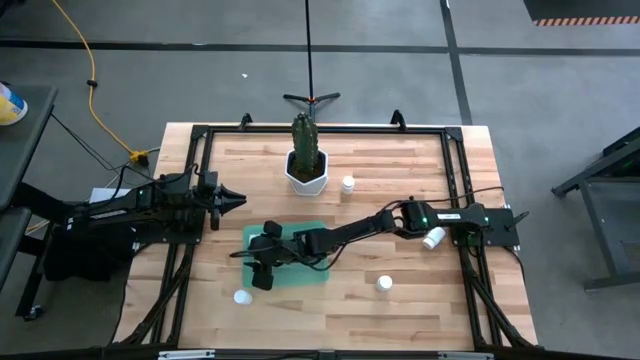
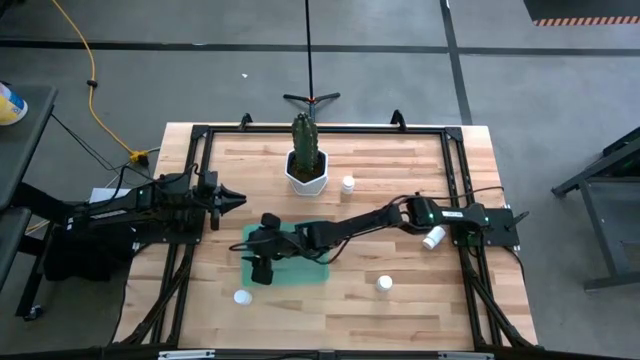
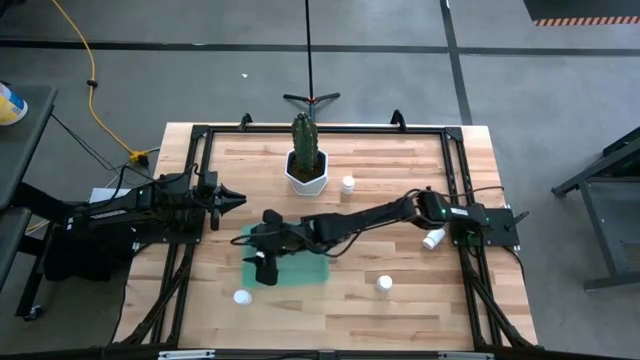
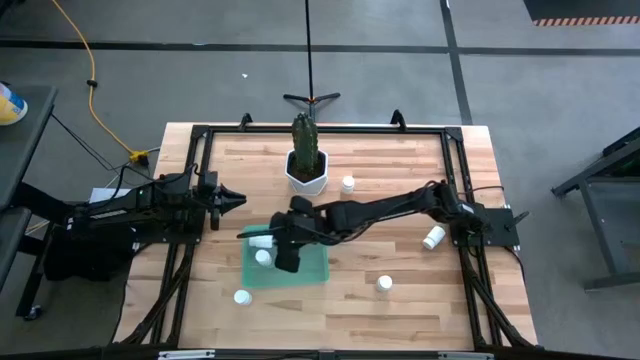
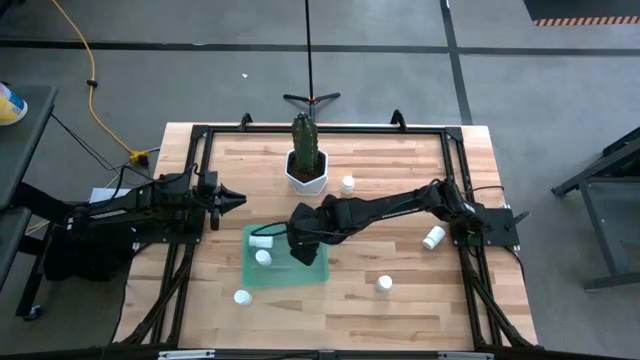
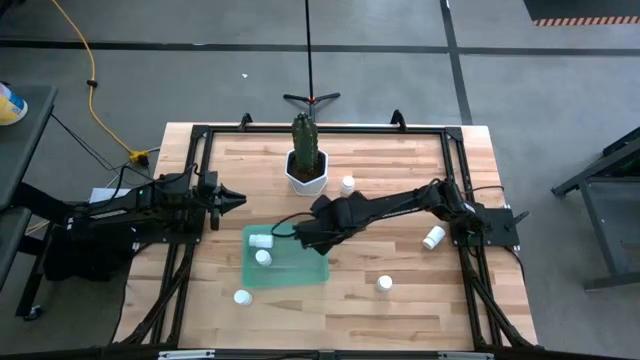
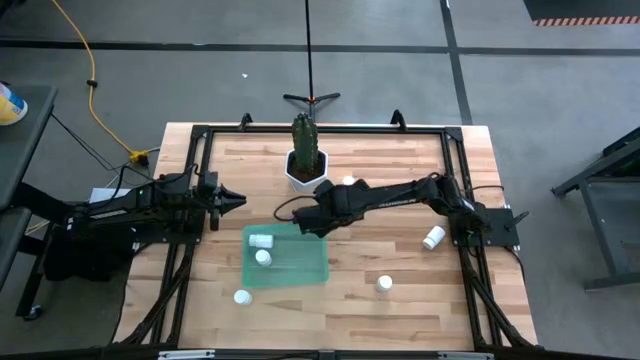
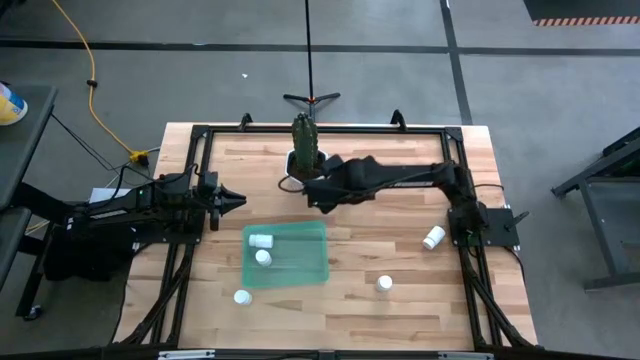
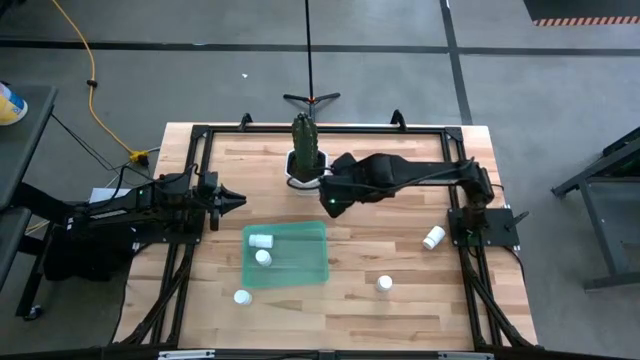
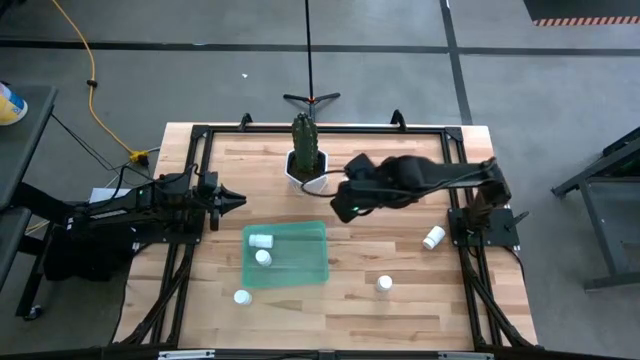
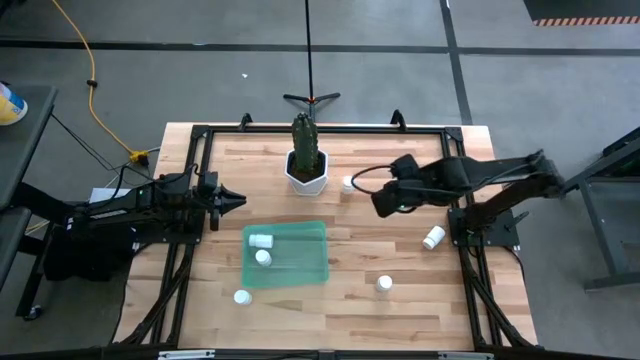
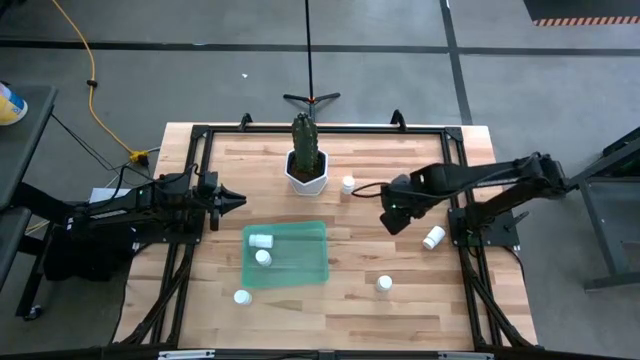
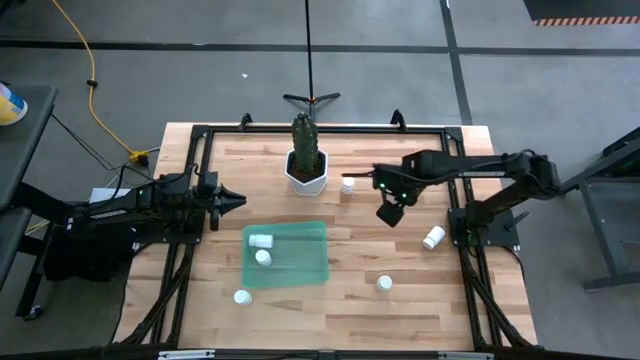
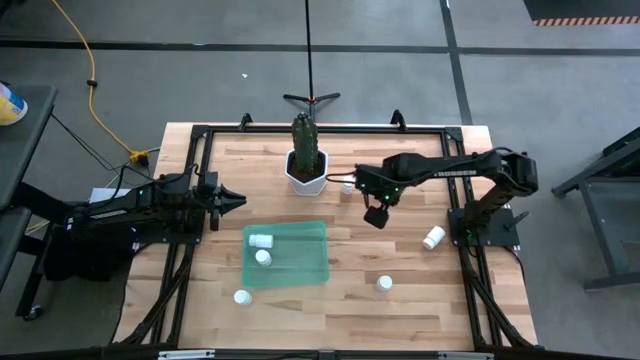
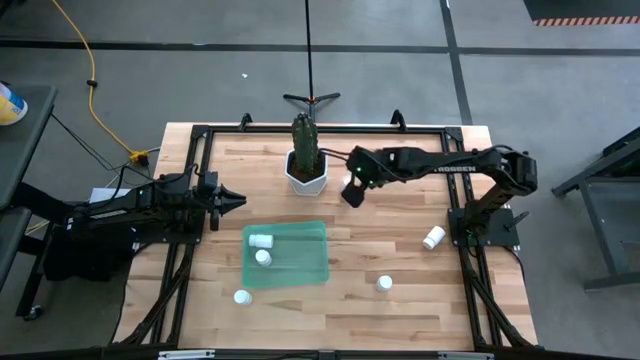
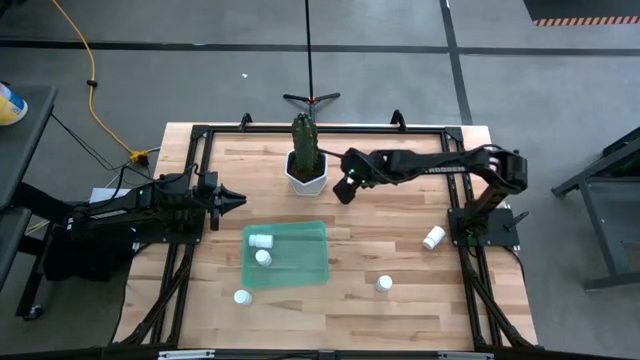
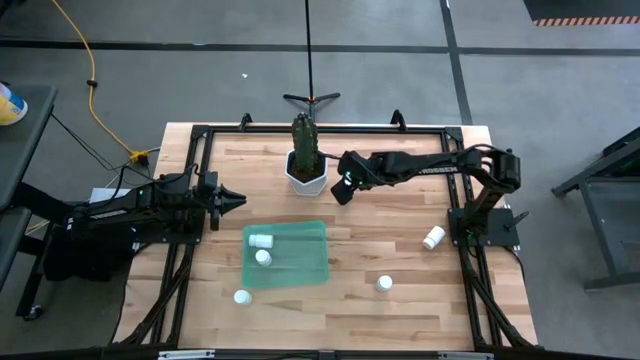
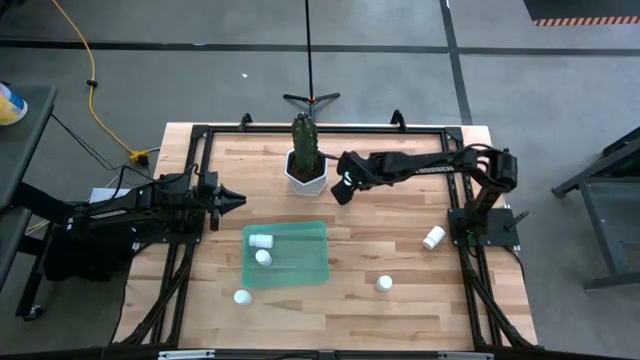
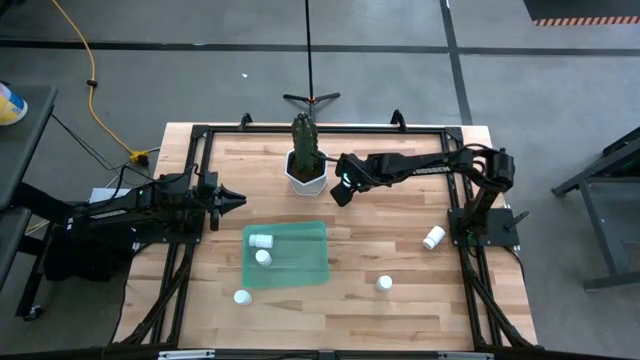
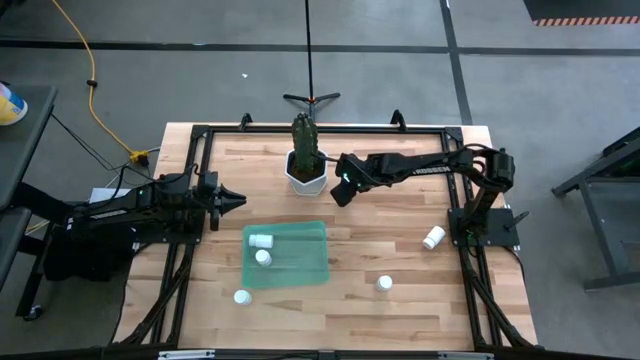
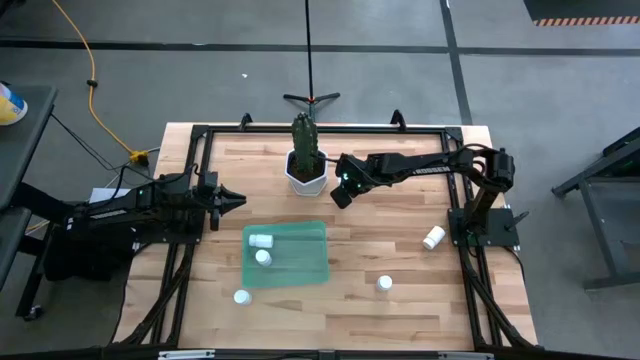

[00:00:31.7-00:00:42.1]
Task: Pick and place pill bottles into a basket
Put the white pill bottle into the green bin

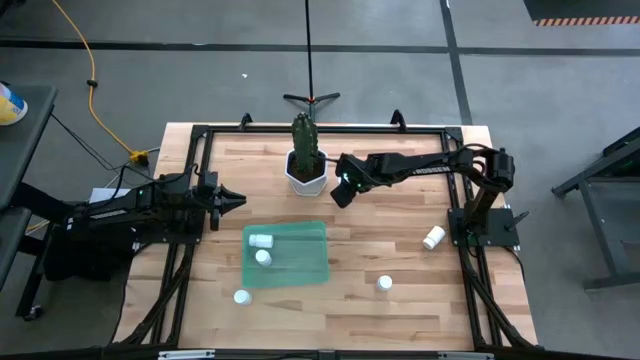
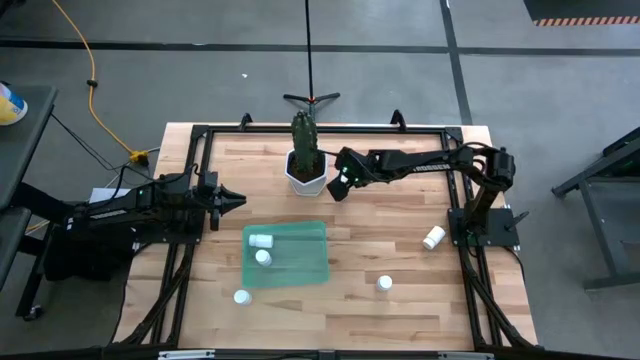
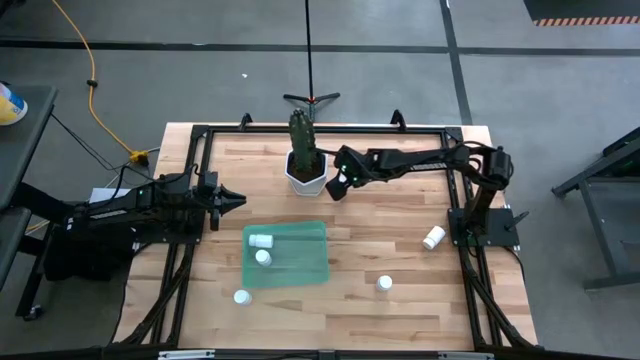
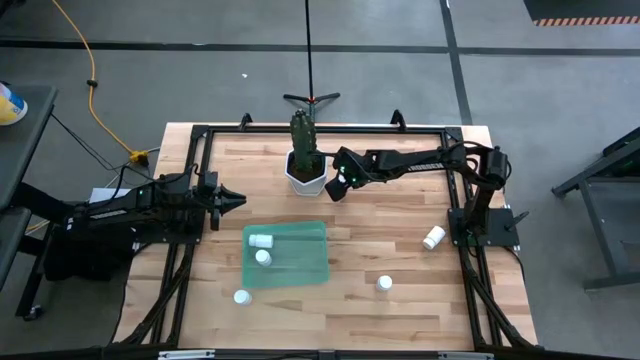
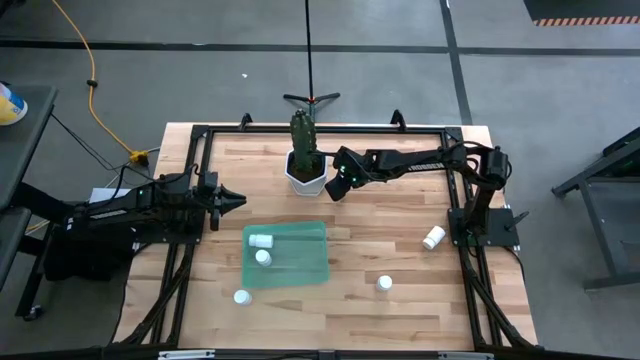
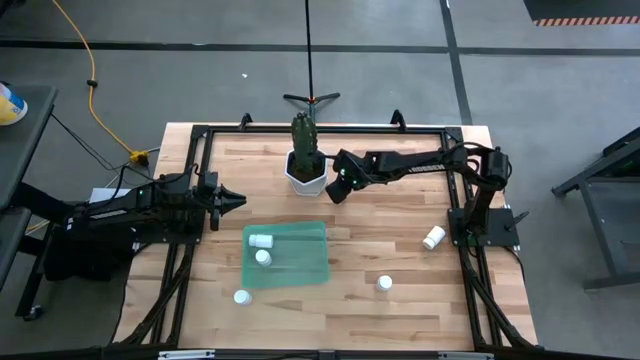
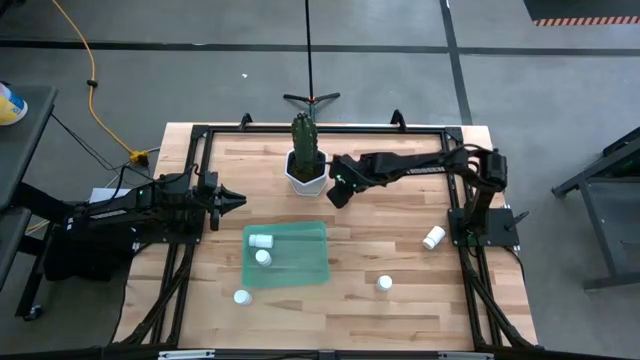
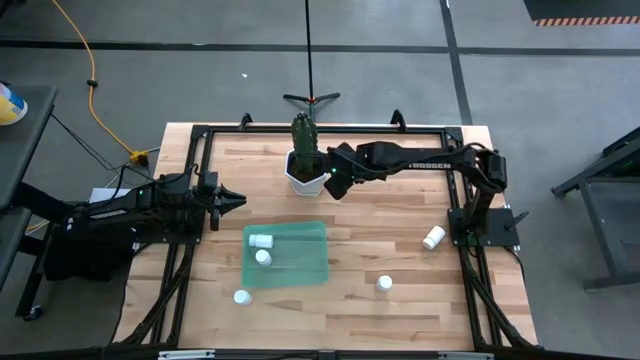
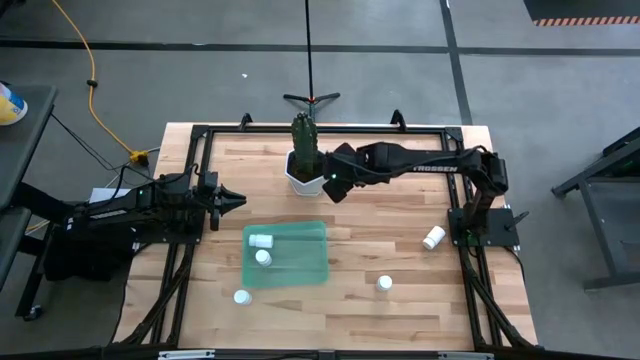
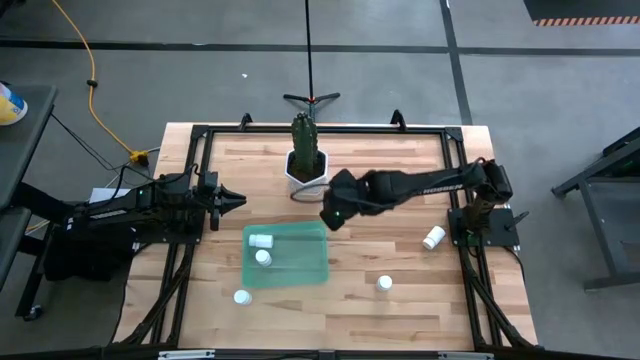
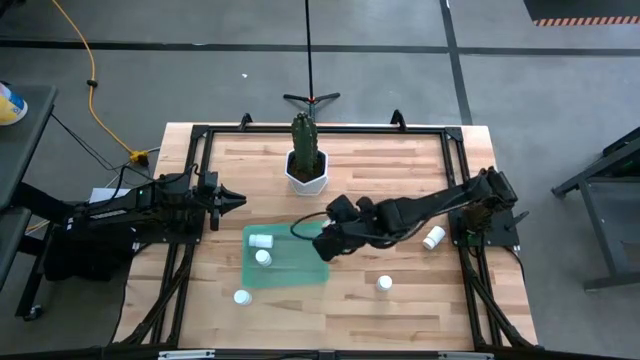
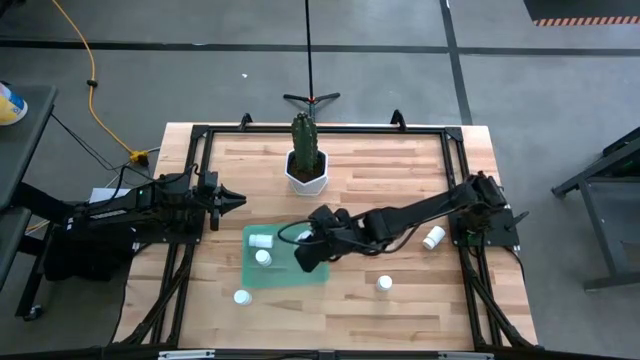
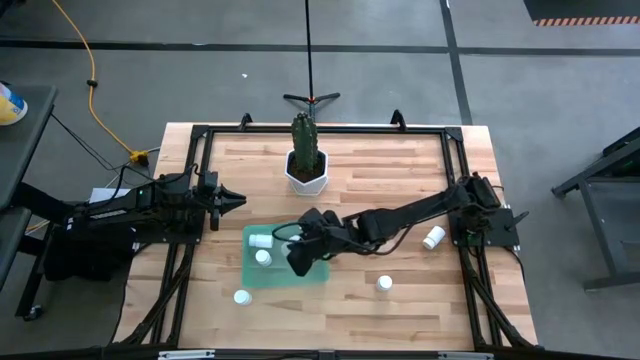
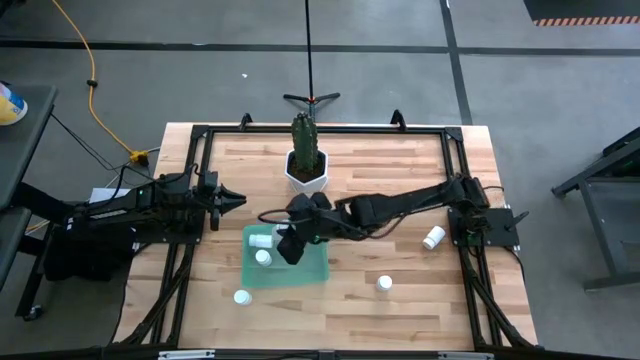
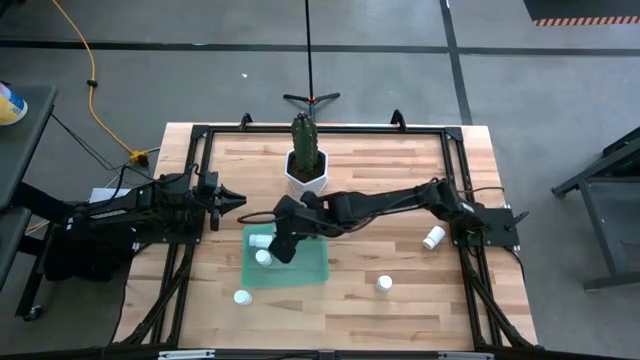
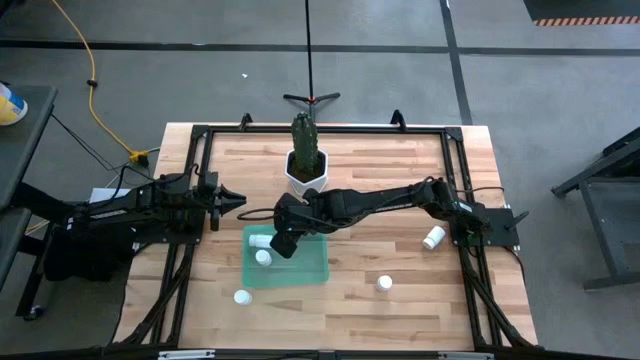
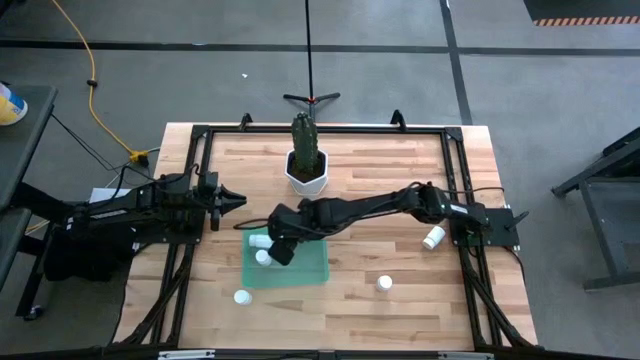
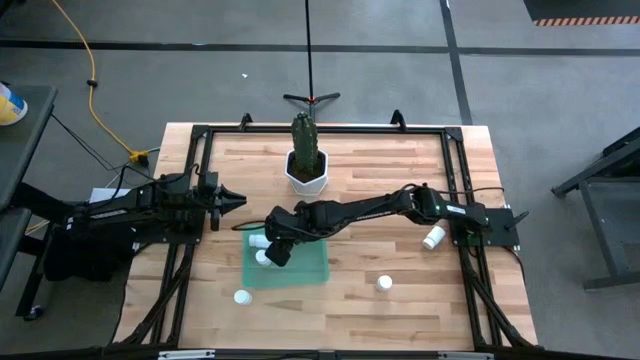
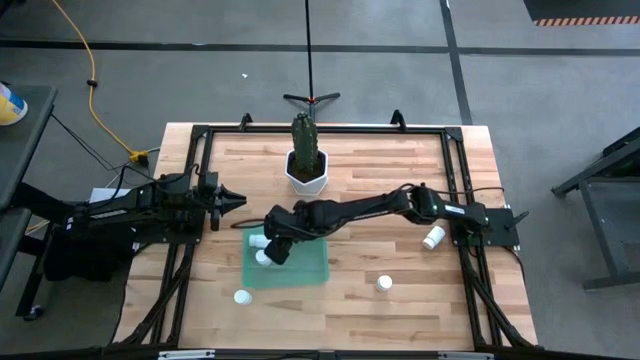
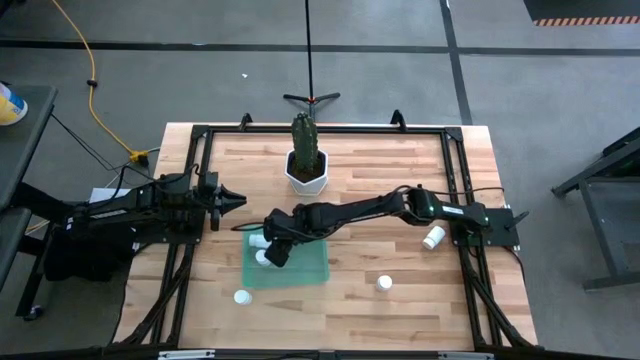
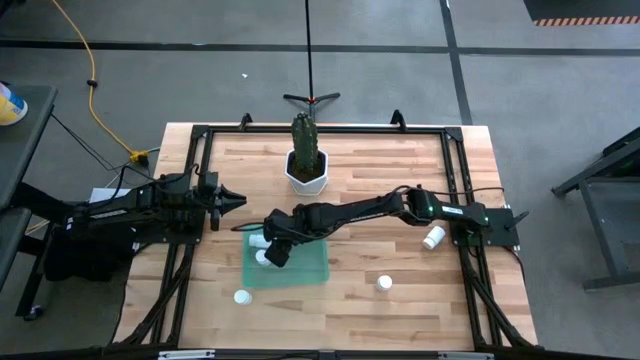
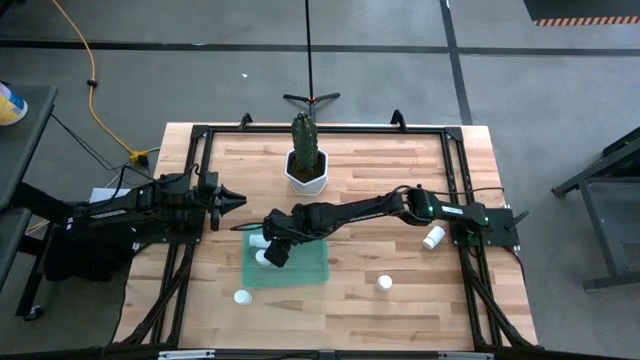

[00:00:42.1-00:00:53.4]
Put the white pill bottle into the green bin

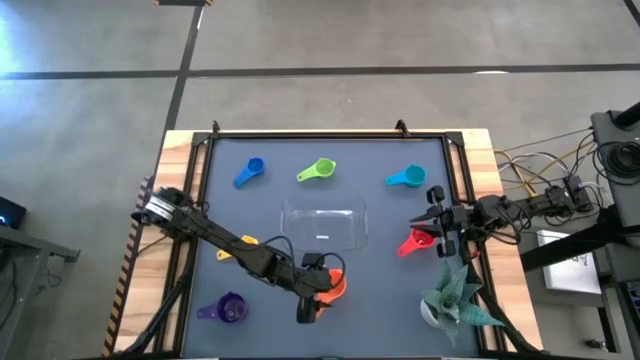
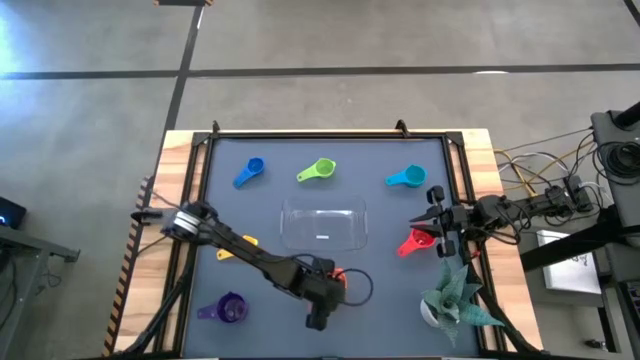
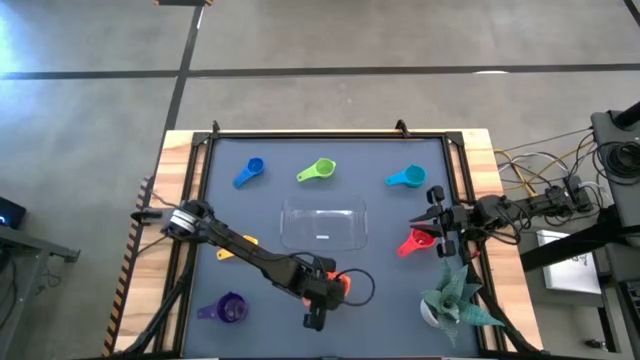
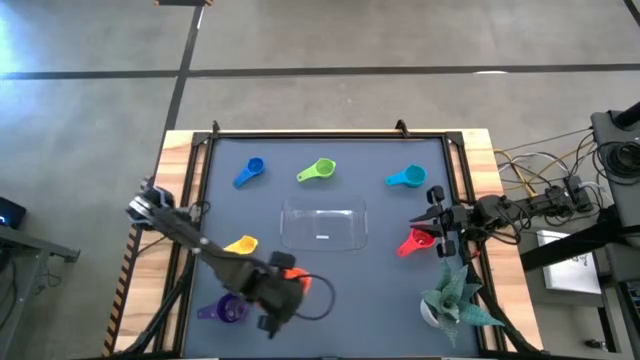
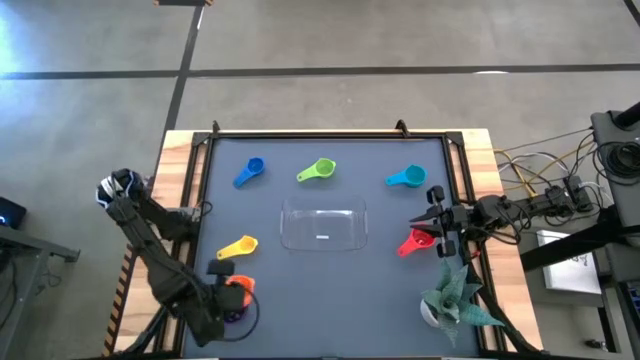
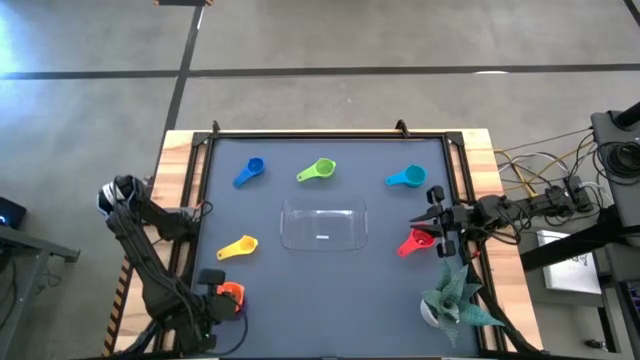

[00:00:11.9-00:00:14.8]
Task: Nest measuring cups in basket
Stack the orange measuring cup on top of the violet measuring cup
